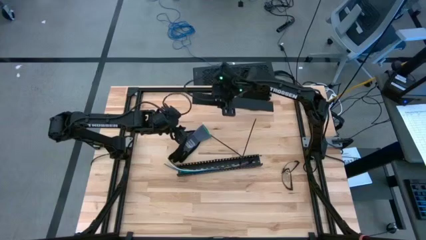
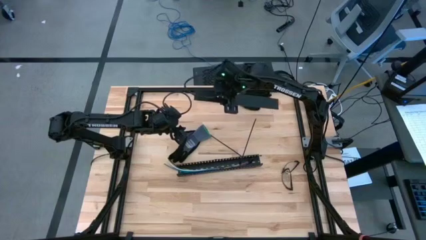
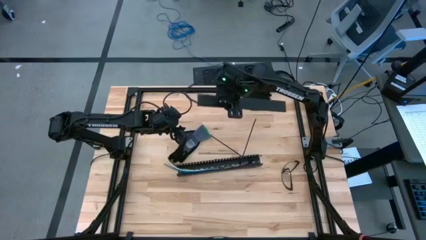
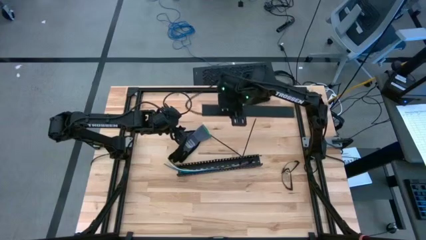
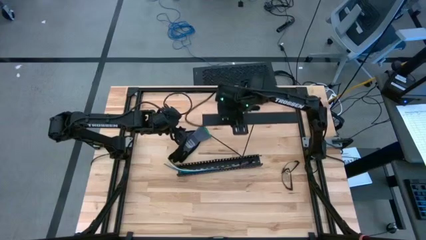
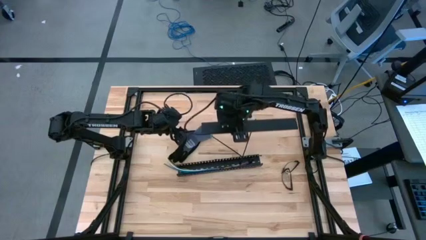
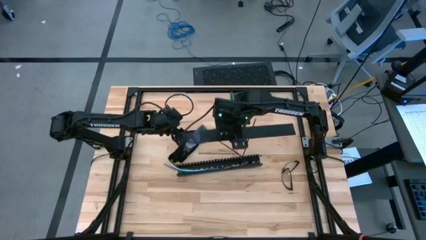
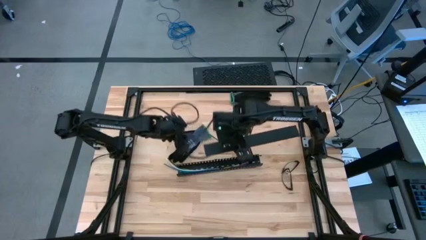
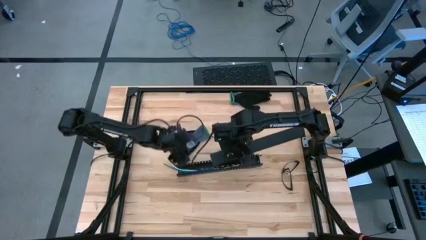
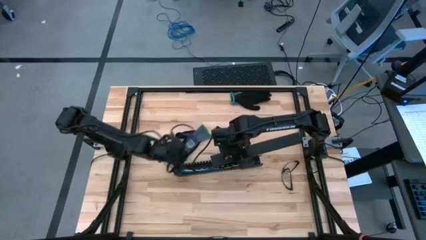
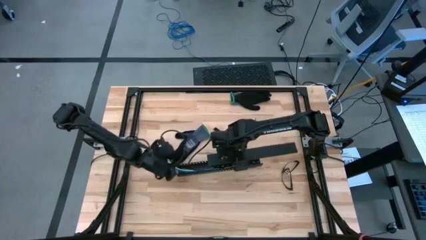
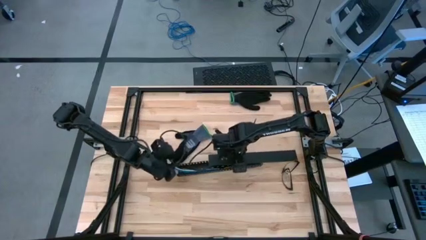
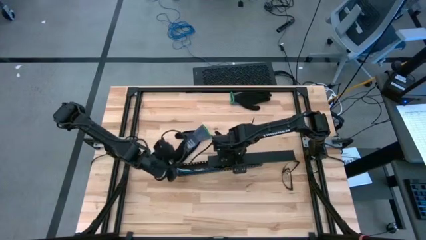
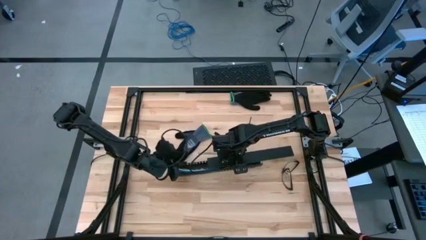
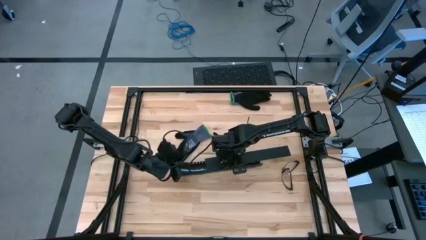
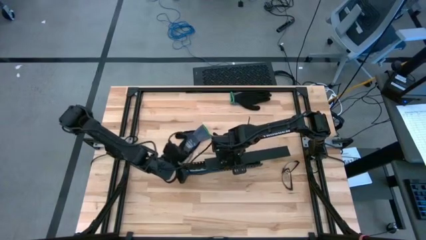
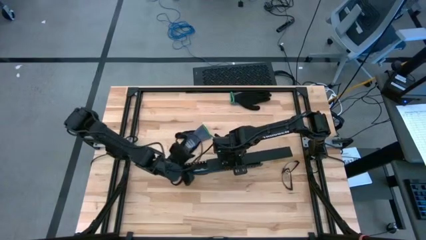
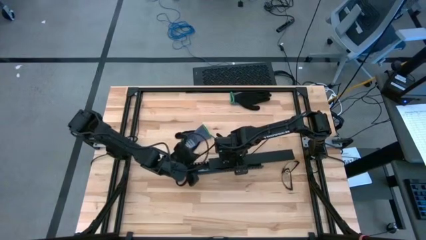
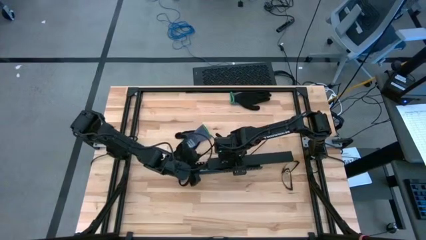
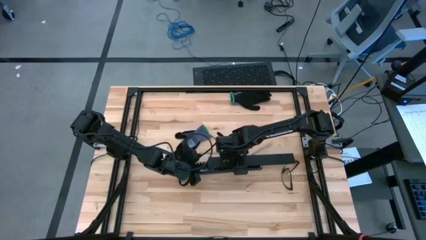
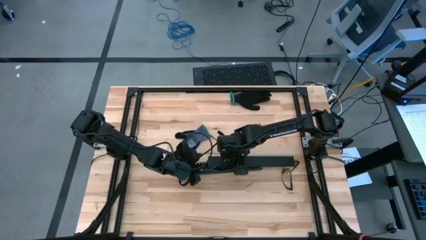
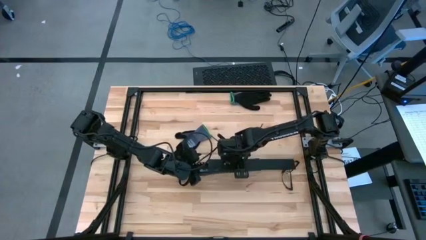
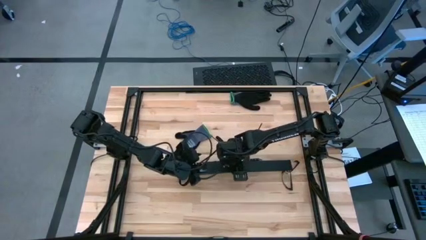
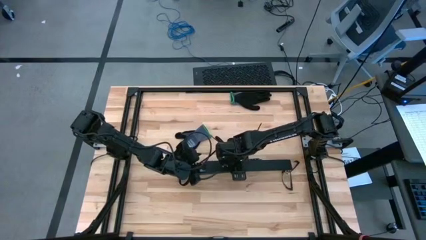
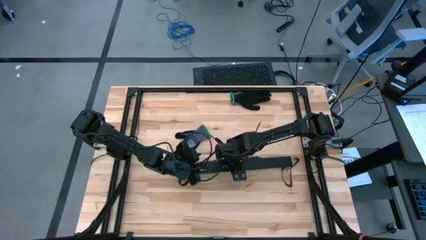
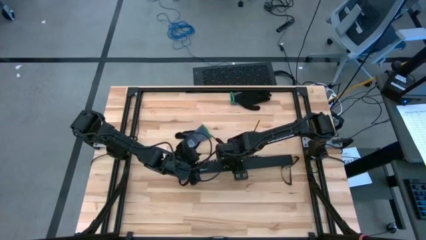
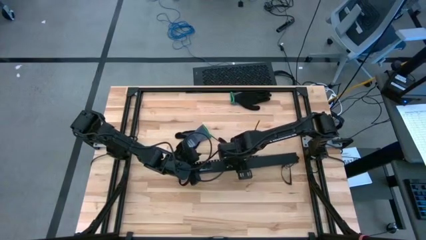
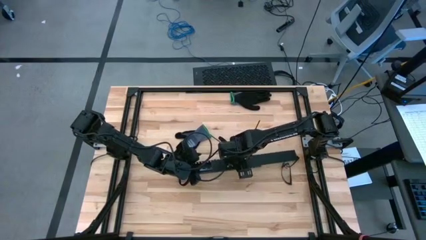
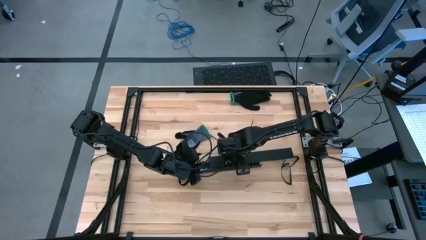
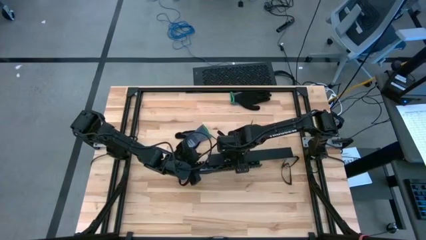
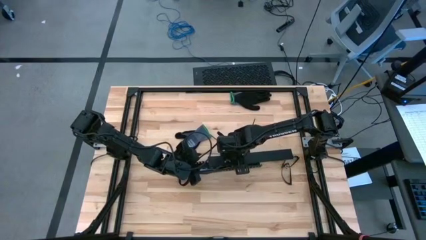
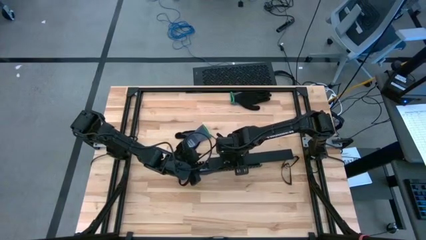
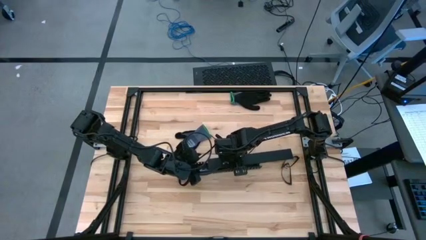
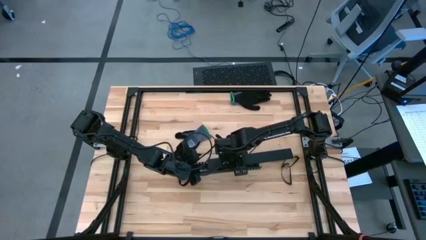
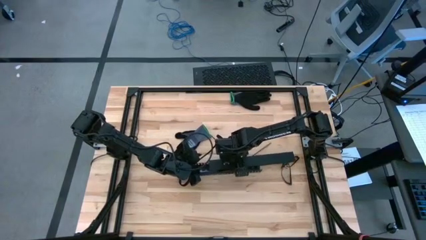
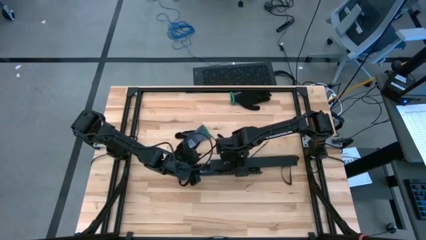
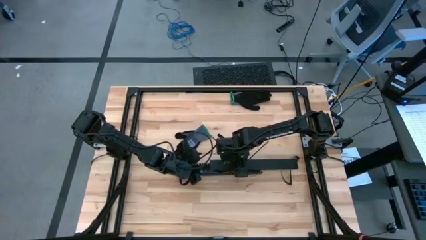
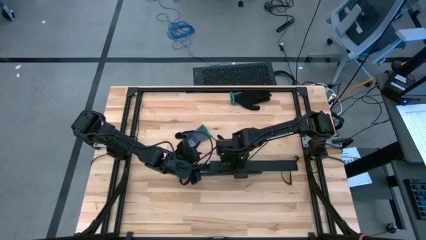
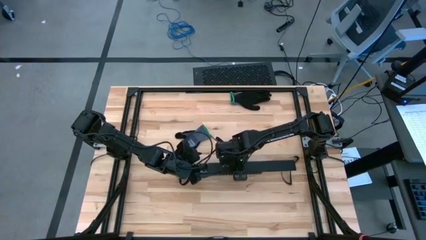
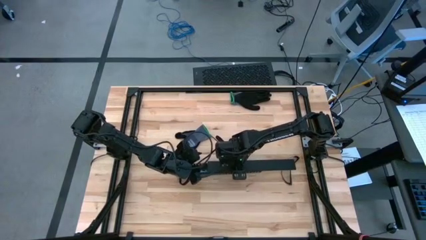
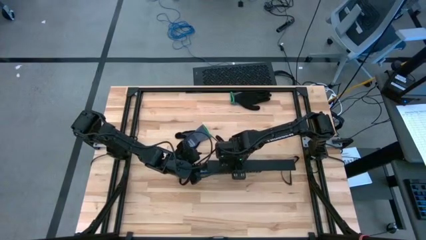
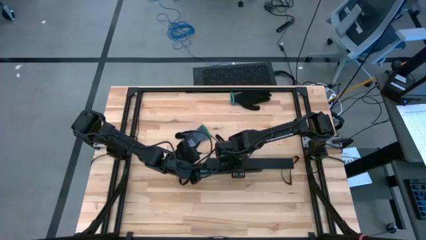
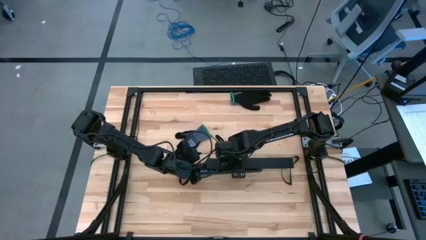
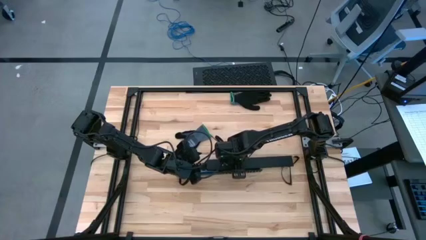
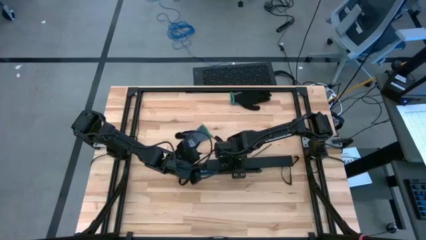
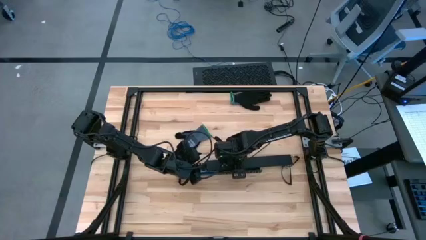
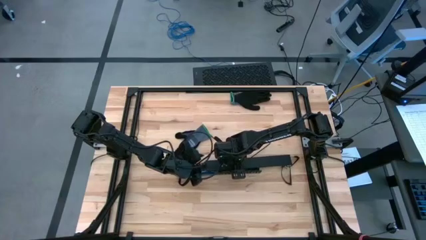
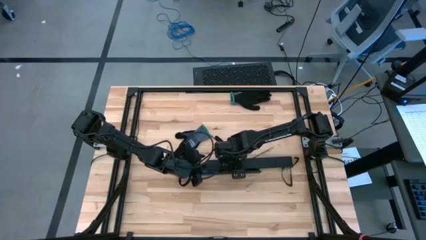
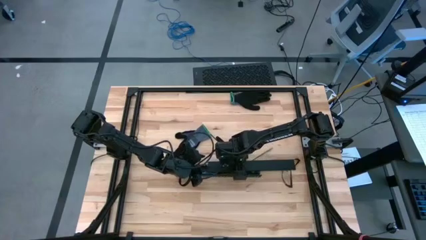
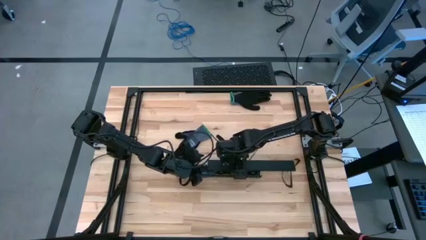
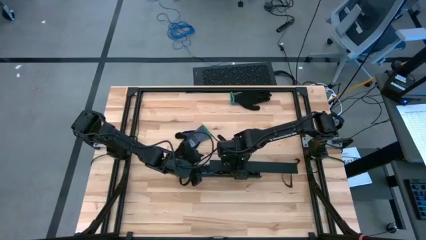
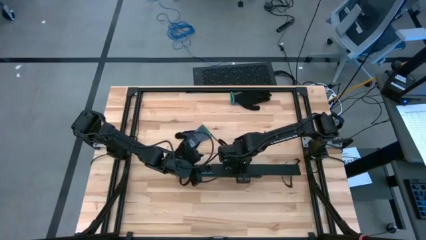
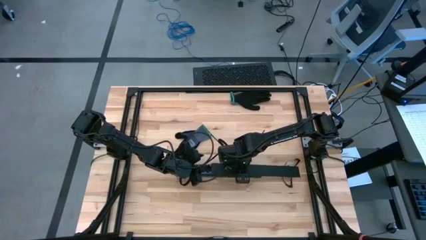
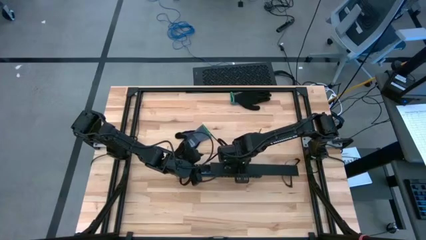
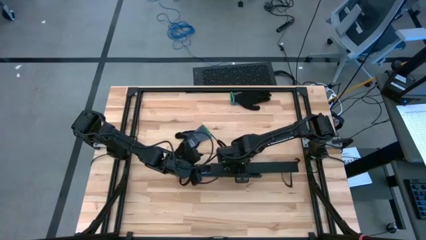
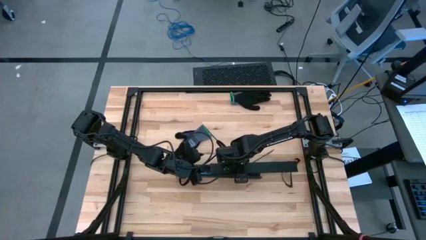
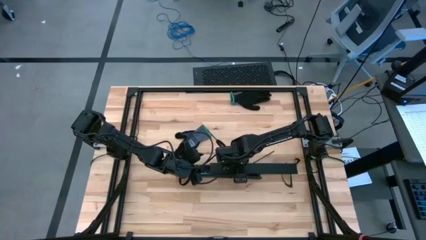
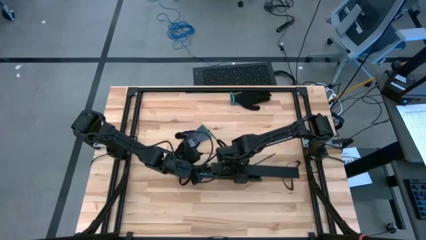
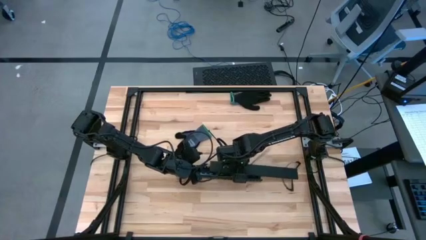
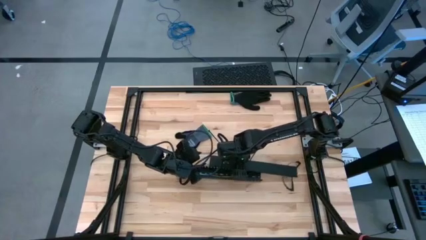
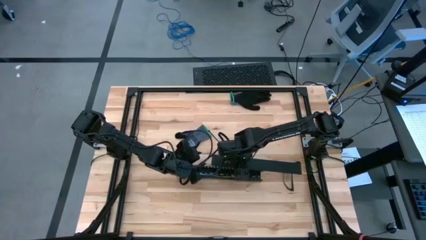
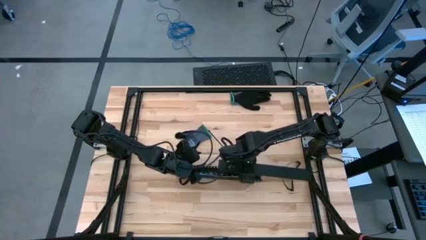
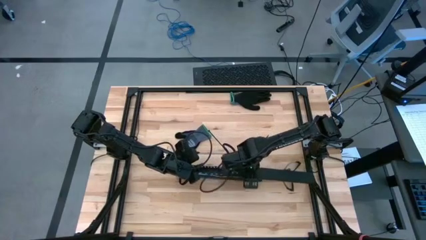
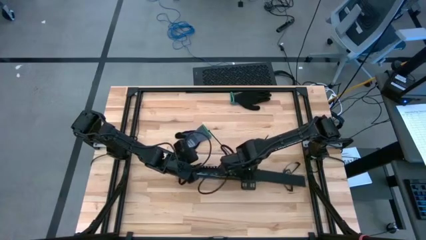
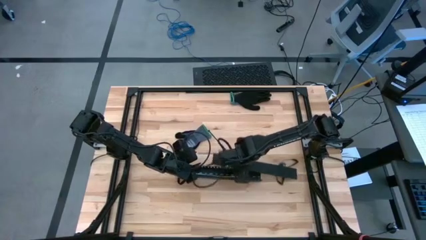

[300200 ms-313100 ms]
Task: Ziptie cables
Close the black cable duct
